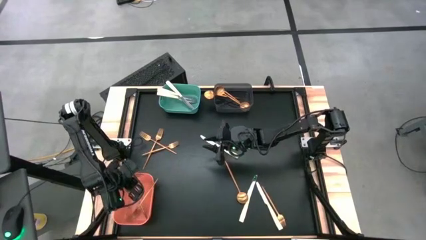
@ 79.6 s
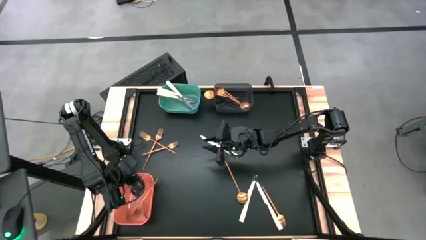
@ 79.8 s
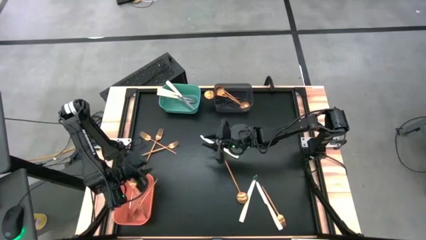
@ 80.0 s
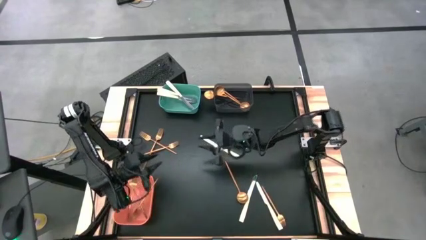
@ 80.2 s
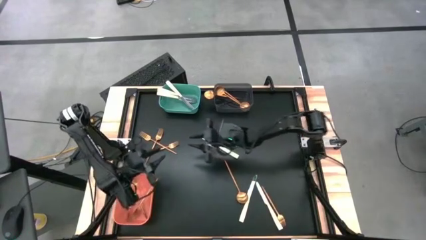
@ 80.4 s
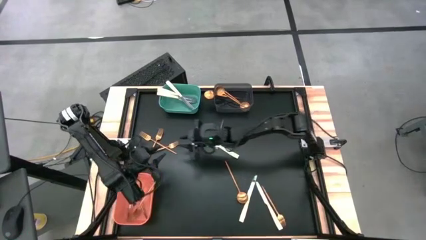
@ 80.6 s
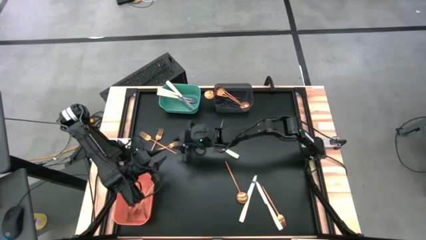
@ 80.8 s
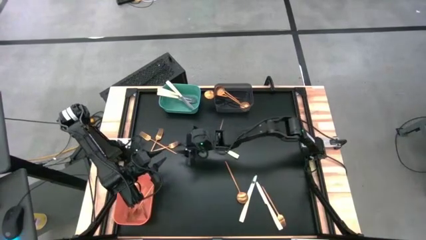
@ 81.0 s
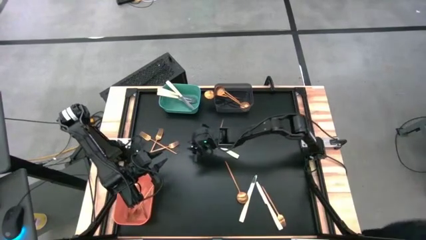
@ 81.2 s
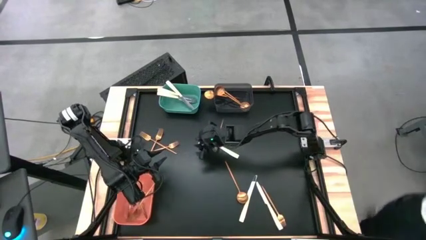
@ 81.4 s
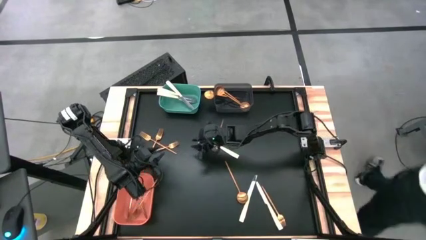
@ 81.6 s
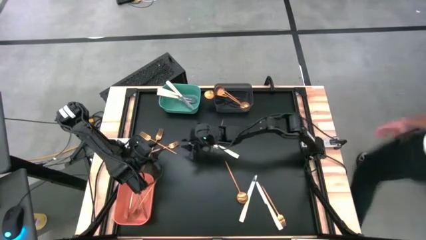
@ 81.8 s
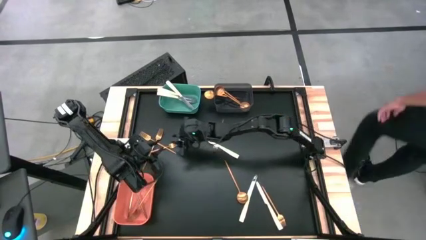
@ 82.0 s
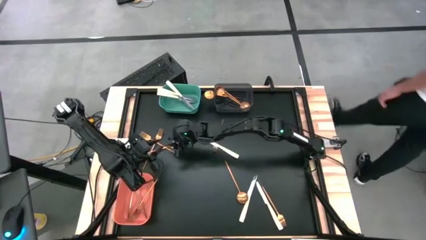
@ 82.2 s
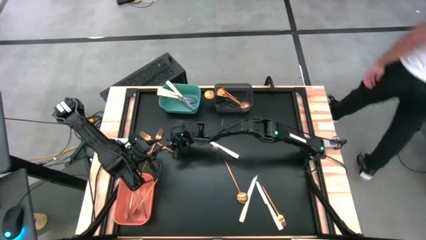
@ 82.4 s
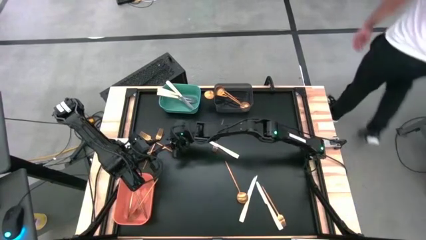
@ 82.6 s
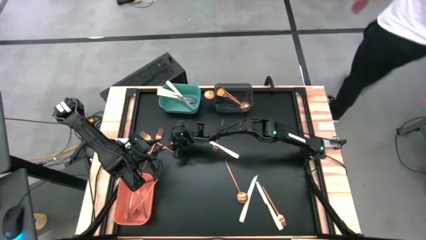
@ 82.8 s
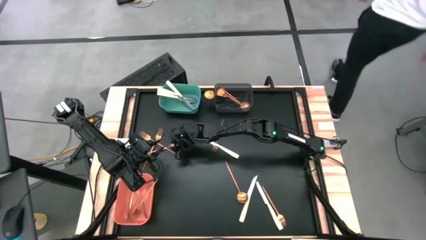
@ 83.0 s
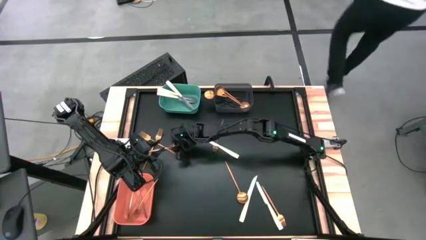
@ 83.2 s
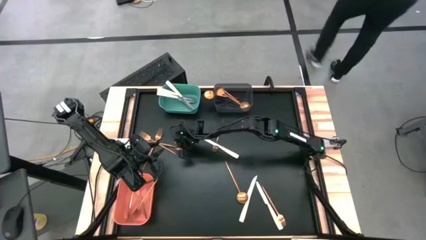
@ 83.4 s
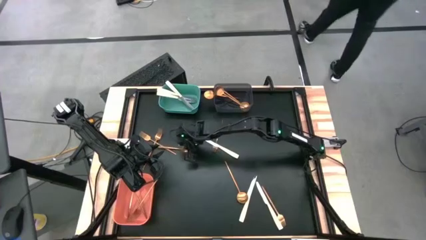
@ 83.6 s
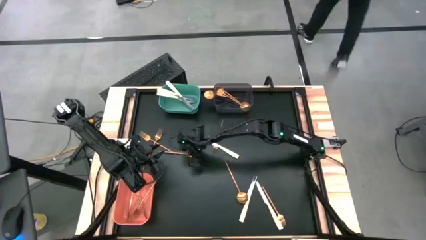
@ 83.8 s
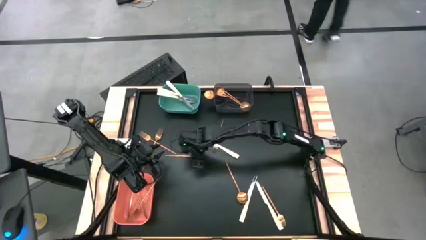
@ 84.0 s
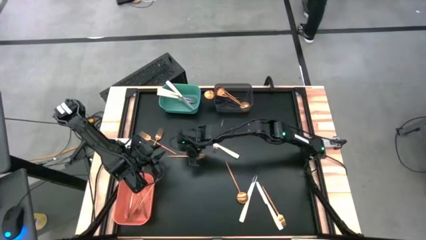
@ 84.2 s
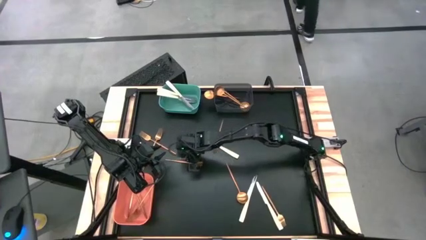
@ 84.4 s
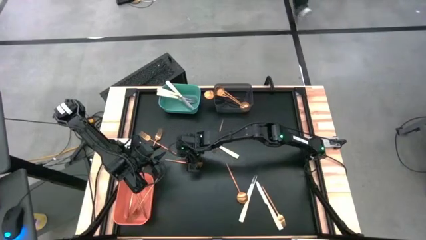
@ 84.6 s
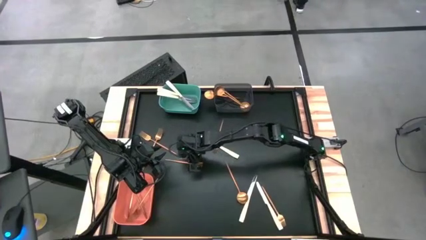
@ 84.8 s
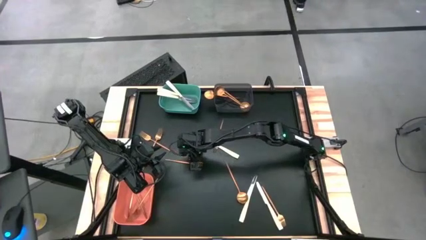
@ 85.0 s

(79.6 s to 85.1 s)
Task: Sort silverware by color (type)
Put the gold fork into the orange bin

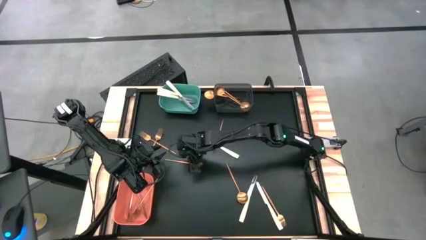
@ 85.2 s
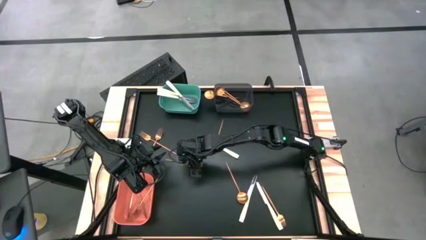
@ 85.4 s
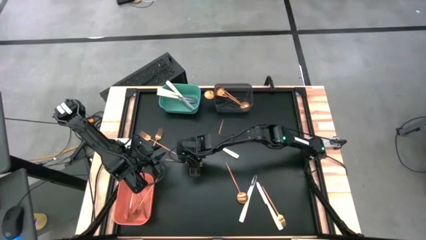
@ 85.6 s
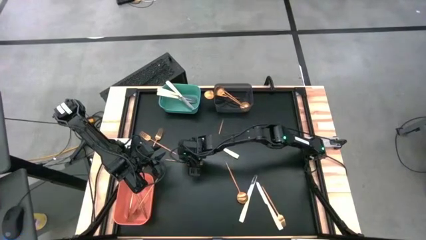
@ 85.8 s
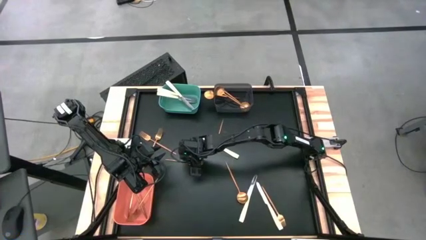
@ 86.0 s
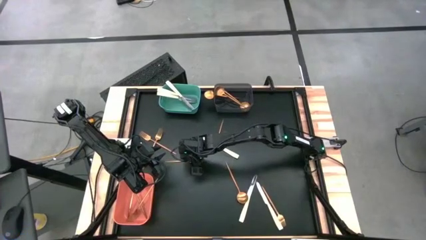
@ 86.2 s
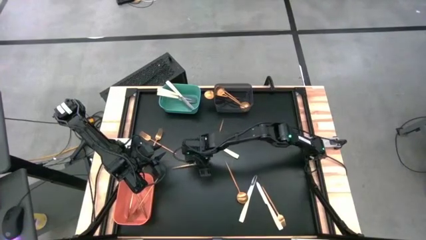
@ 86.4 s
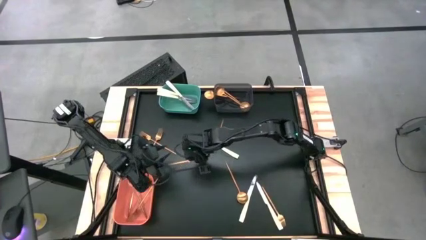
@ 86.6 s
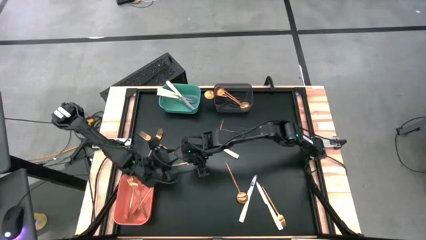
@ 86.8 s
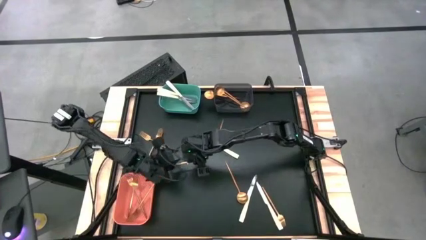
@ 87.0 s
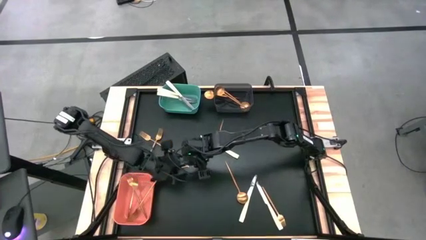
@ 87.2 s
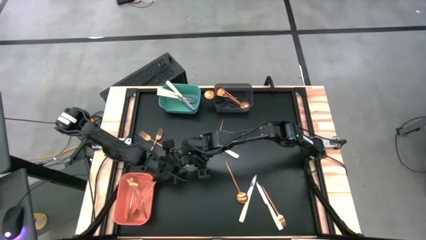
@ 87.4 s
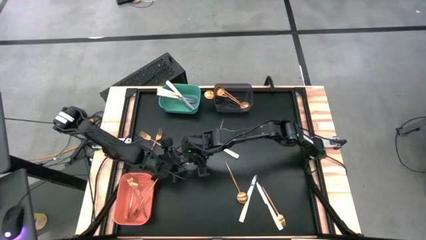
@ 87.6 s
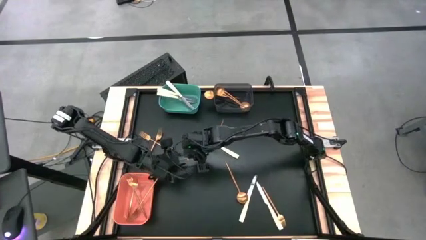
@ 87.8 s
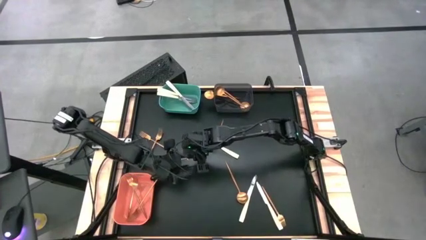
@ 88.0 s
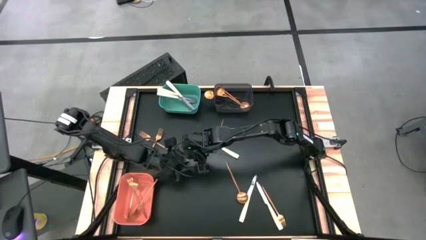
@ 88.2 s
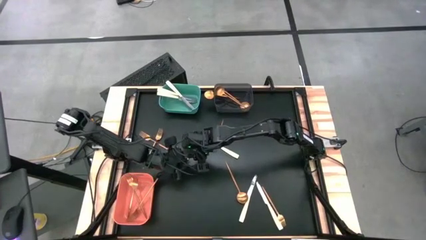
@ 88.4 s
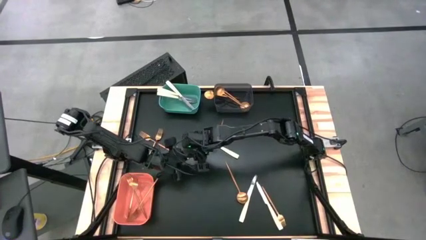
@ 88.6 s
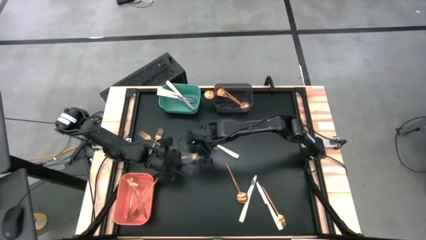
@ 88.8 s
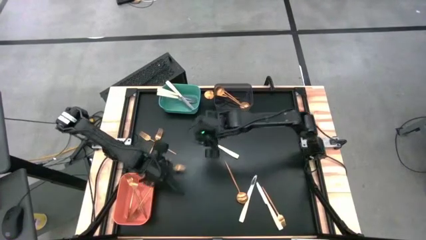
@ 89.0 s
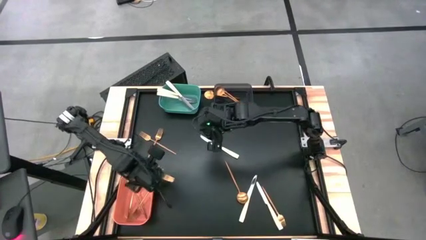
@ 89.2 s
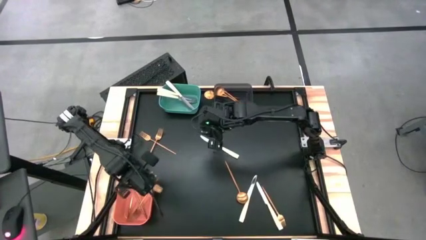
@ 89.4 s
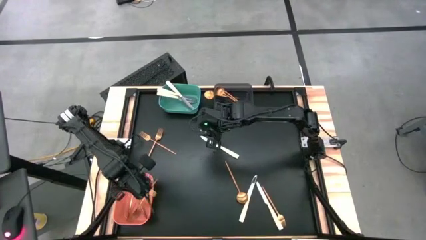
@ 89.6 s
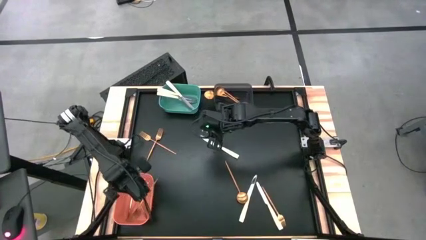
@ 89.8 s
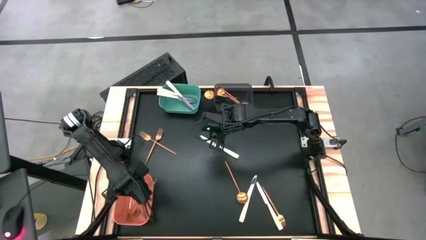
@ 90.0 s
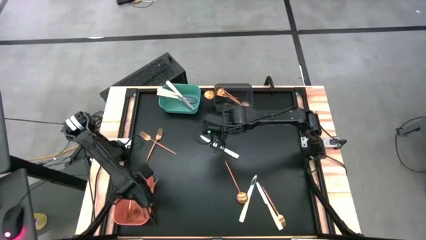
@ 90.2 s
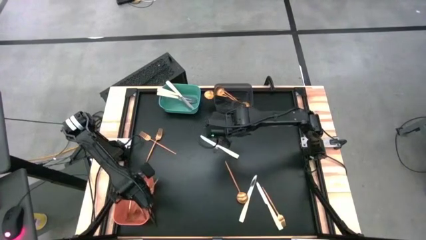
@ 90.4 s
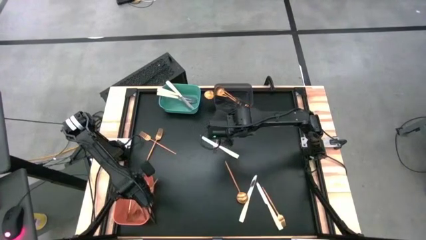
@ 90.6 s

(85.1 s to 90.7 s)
Put the gold fork into the orange bin

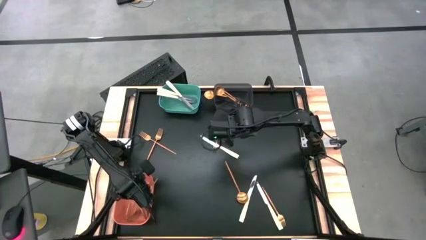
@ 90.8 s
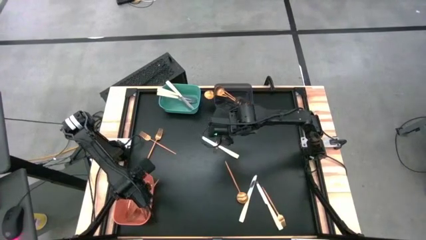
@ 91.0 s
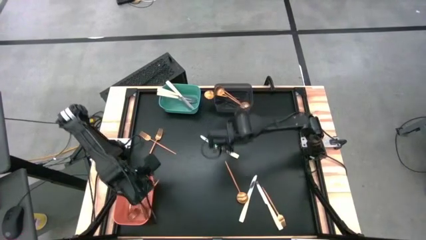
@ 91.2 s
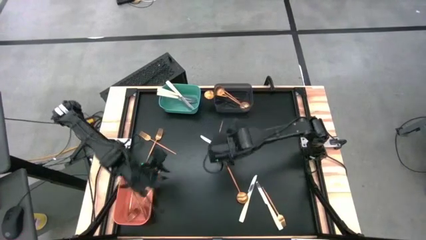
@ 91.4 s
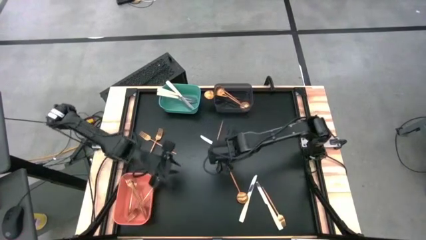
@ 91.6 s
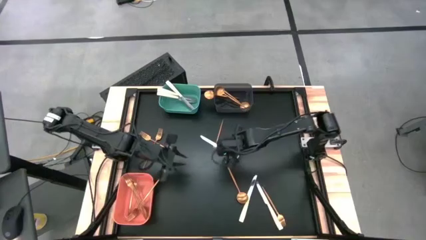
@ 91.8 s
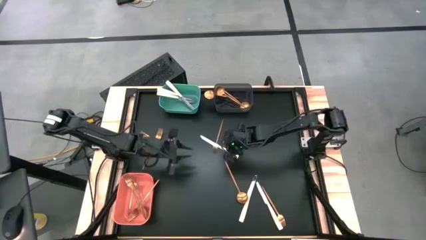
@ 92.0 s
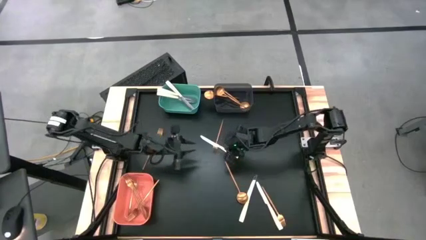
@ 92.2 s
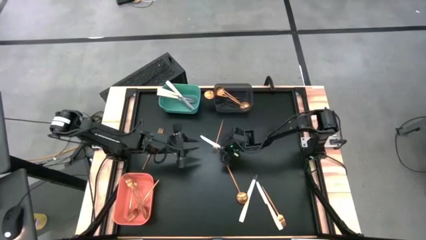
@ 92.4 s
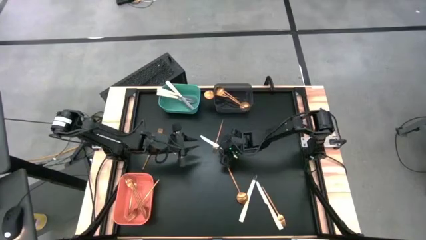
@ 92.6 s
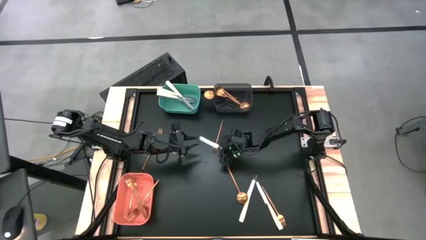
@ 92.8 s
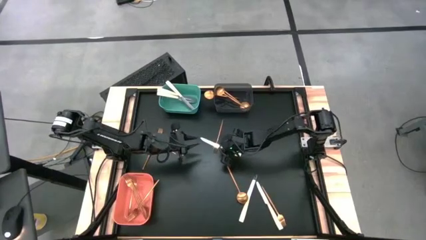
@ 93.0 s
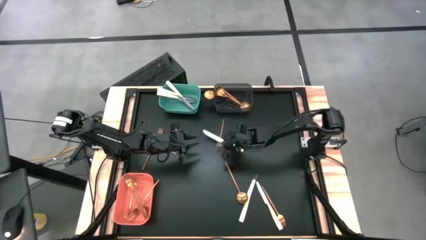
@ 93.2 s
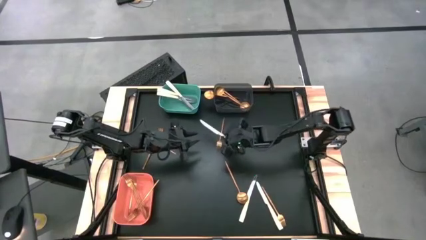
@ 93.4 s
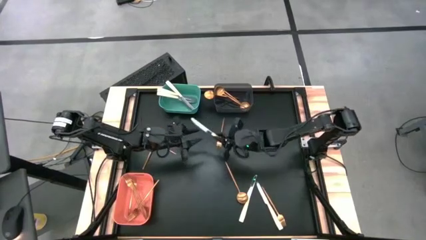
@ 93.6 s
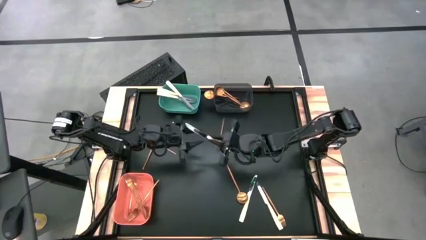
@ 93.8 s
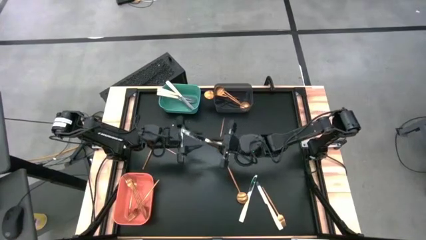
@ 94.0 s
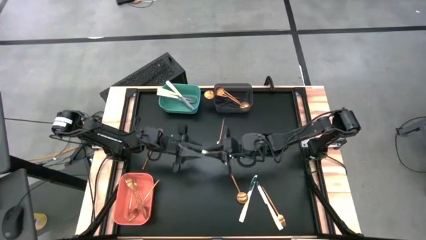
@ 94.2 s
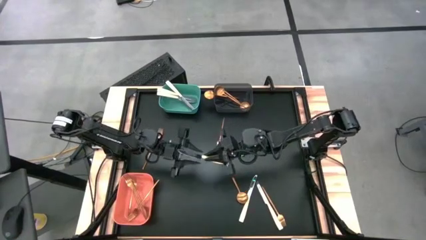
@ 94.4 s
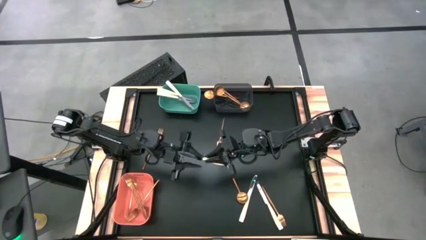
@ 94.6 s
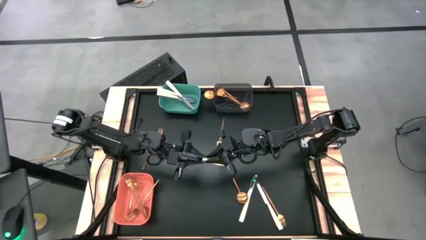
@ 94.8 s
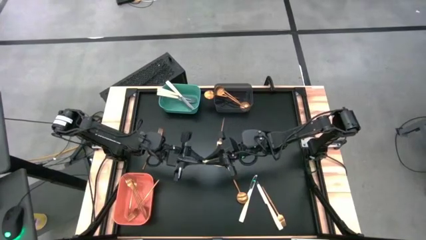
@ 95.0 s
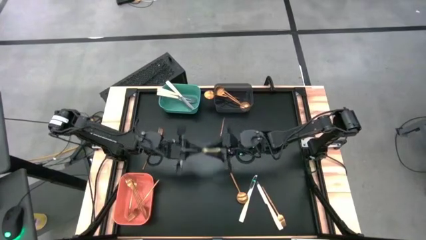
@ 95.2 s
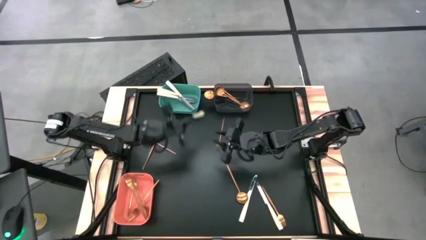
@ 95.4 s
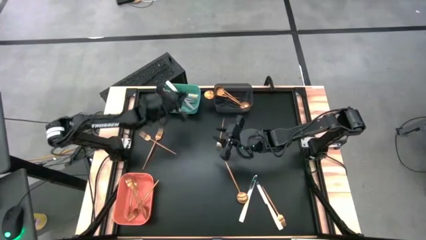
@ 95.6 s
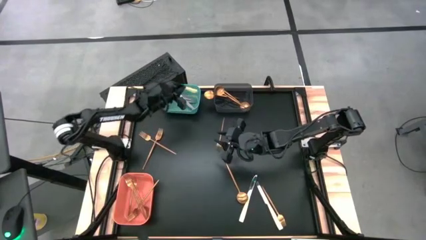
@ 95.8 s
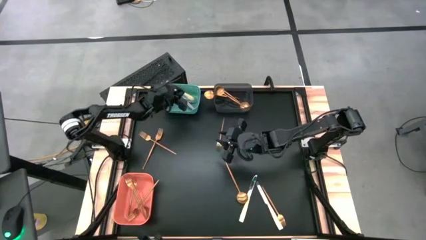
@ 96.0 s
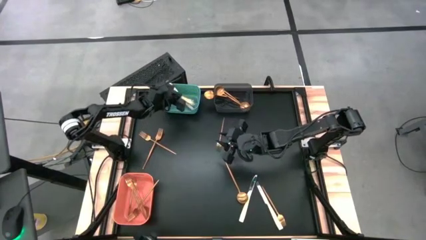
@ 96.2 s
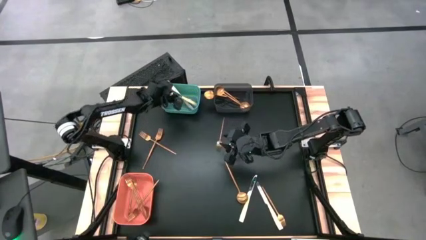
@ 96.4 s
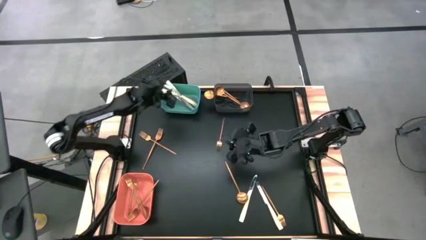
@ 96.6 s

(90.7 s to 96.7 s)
Put the silver knife into the light blue bin
